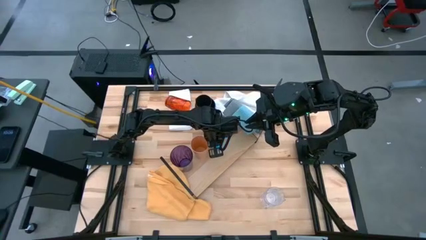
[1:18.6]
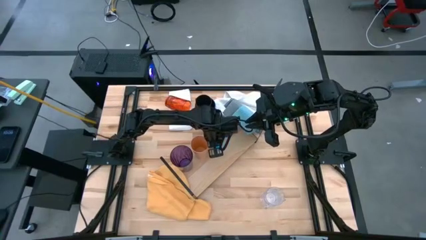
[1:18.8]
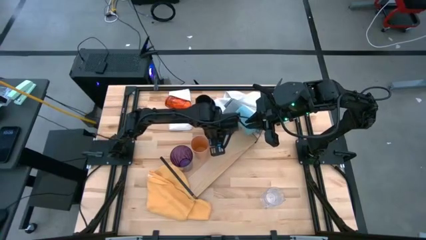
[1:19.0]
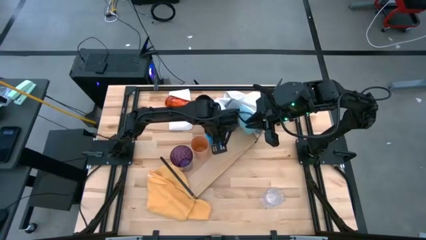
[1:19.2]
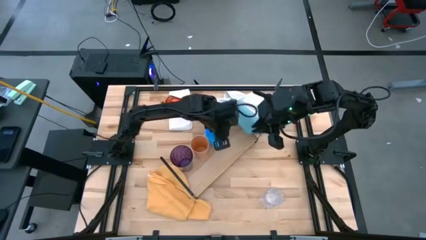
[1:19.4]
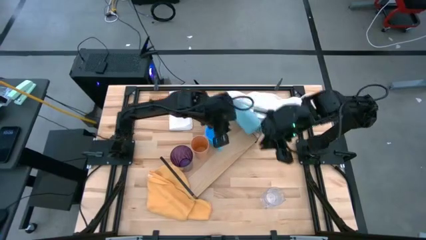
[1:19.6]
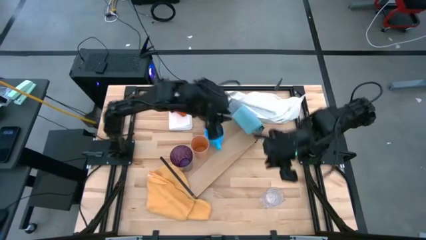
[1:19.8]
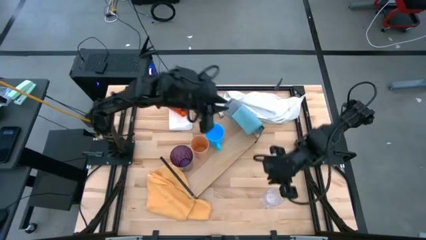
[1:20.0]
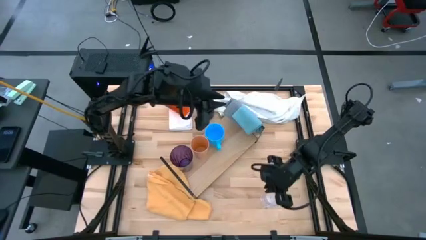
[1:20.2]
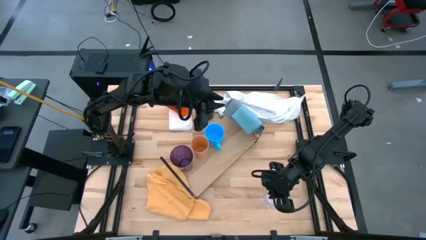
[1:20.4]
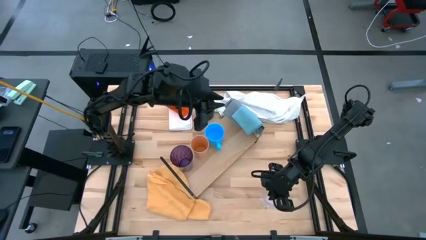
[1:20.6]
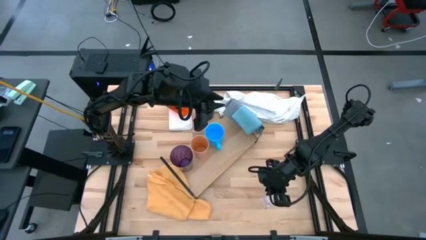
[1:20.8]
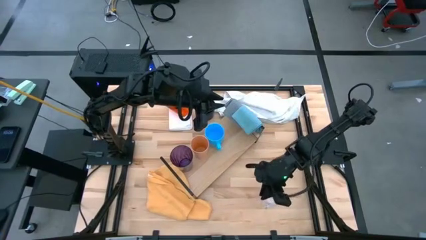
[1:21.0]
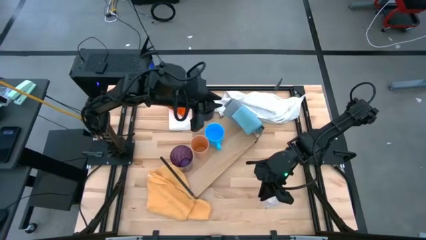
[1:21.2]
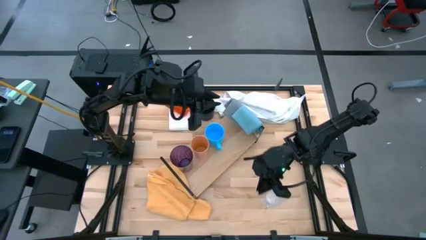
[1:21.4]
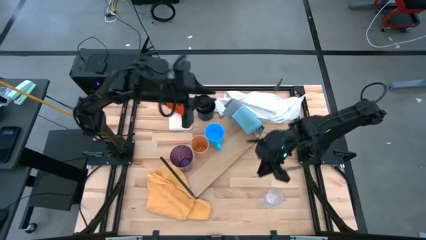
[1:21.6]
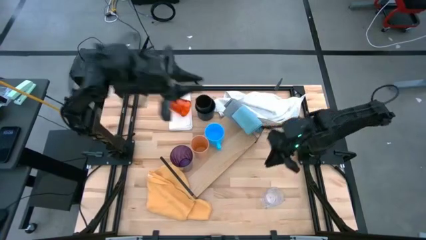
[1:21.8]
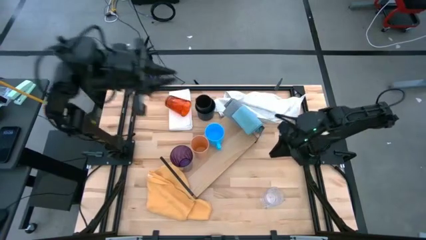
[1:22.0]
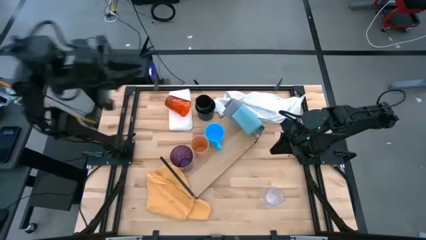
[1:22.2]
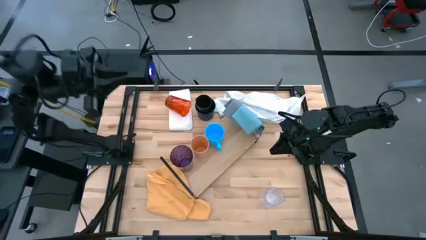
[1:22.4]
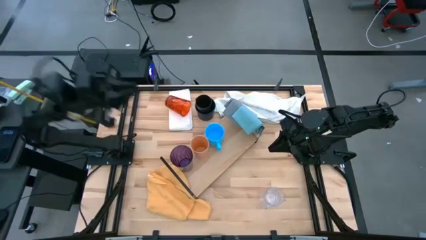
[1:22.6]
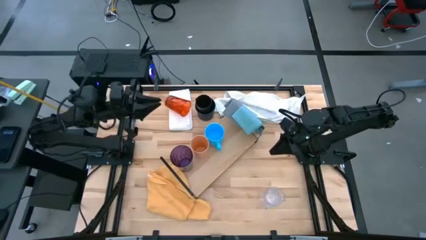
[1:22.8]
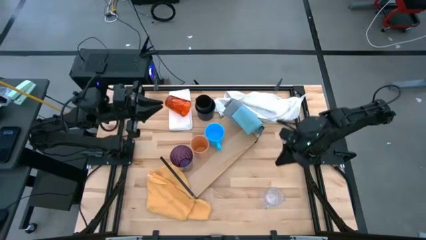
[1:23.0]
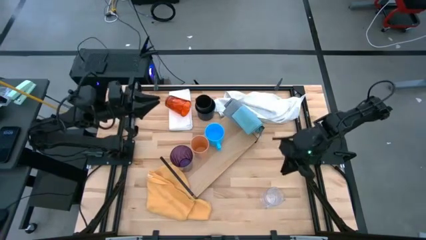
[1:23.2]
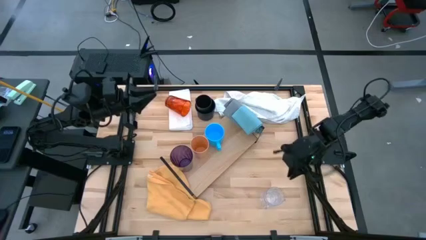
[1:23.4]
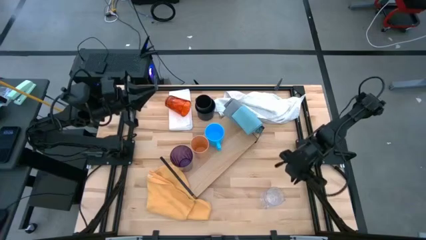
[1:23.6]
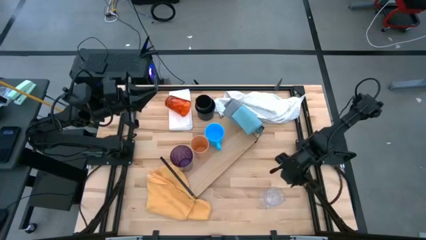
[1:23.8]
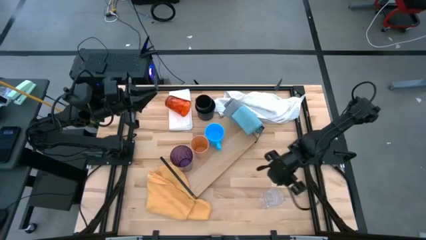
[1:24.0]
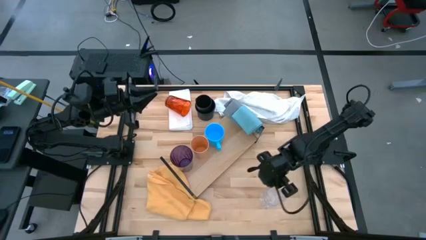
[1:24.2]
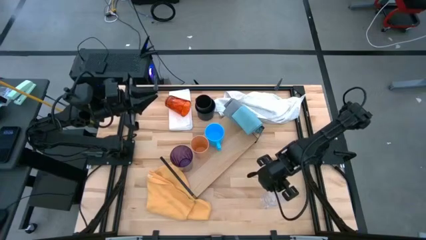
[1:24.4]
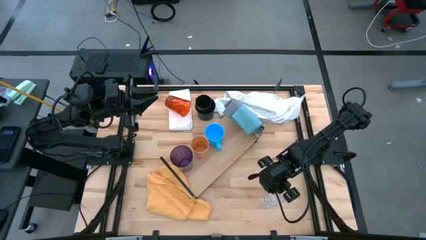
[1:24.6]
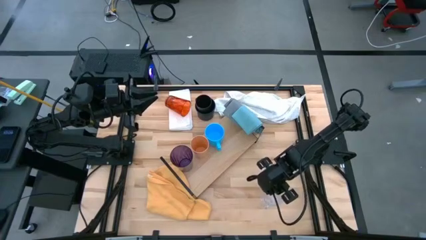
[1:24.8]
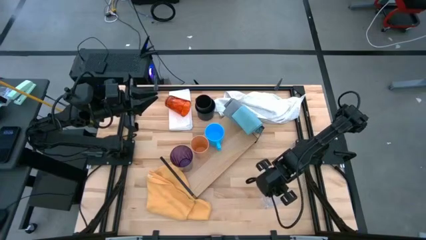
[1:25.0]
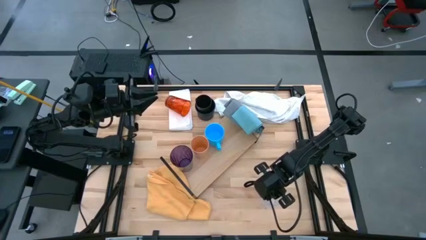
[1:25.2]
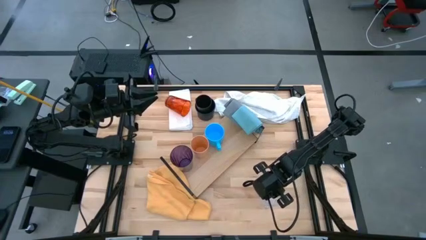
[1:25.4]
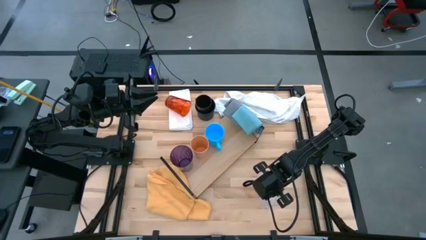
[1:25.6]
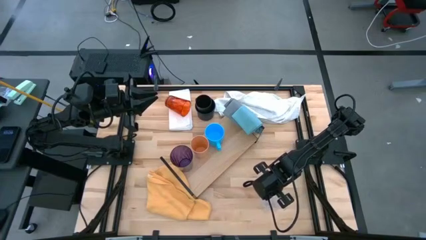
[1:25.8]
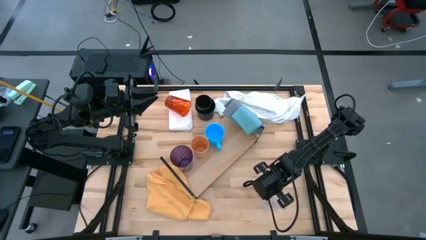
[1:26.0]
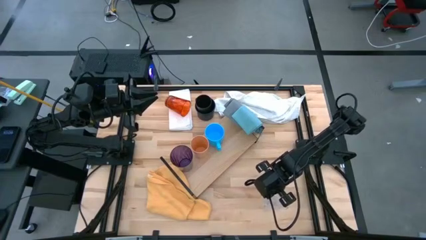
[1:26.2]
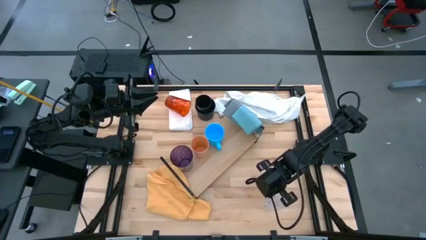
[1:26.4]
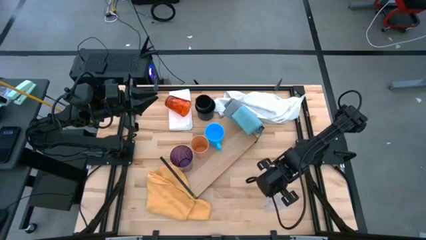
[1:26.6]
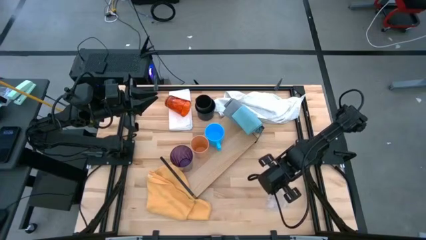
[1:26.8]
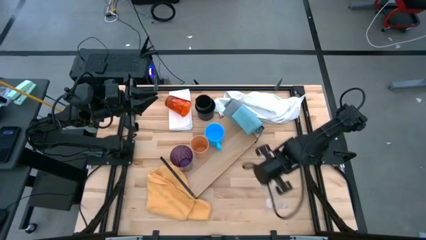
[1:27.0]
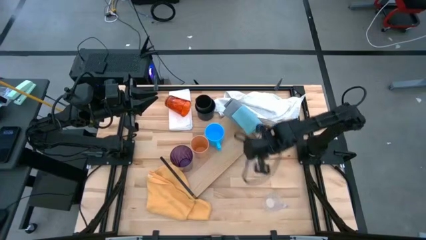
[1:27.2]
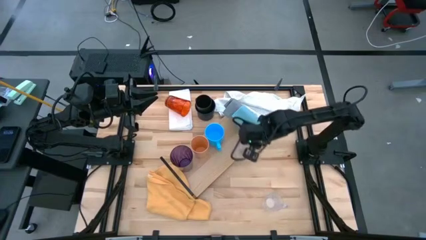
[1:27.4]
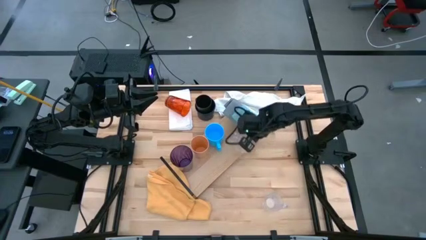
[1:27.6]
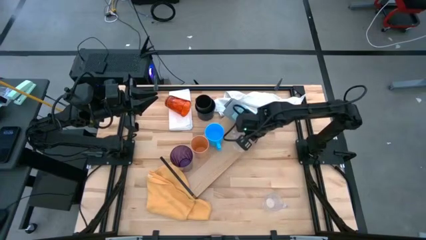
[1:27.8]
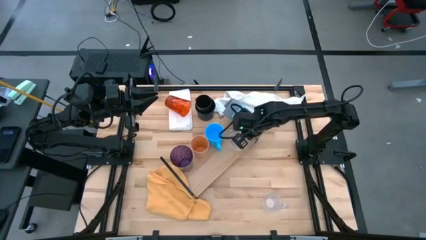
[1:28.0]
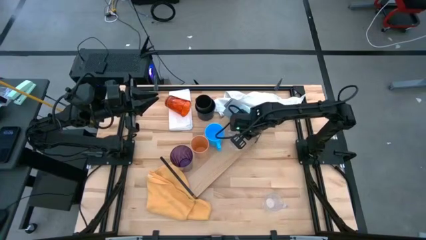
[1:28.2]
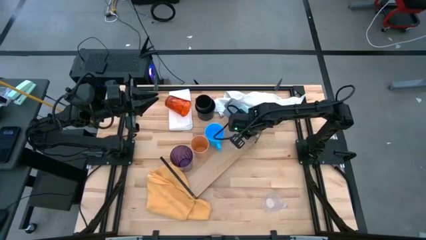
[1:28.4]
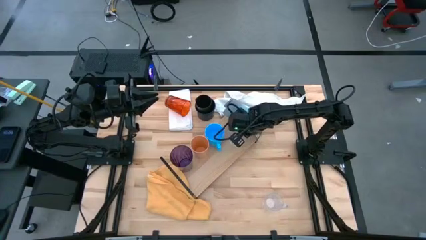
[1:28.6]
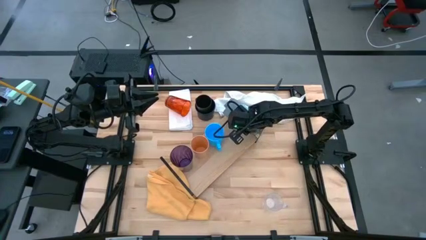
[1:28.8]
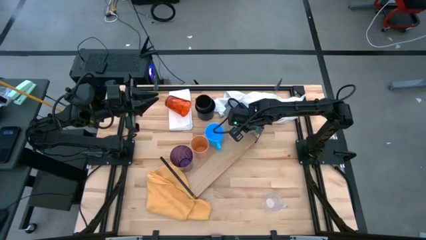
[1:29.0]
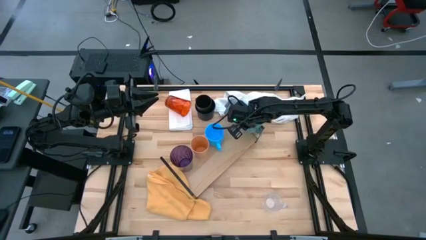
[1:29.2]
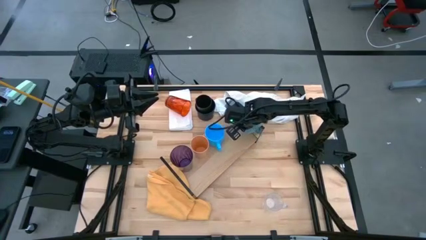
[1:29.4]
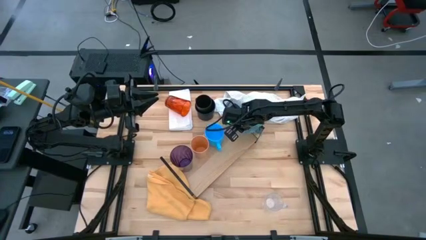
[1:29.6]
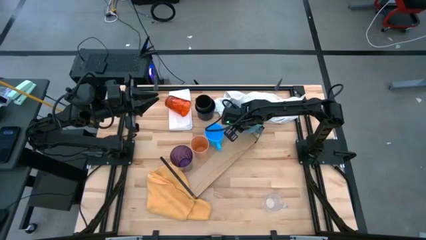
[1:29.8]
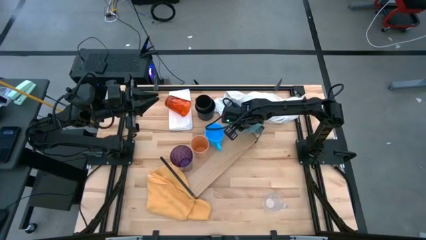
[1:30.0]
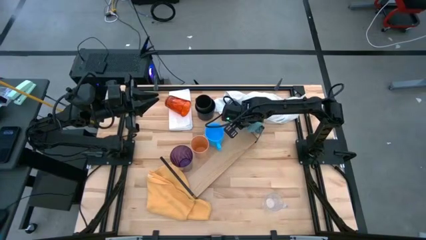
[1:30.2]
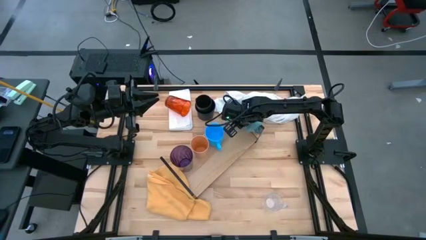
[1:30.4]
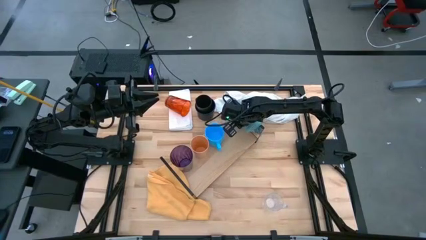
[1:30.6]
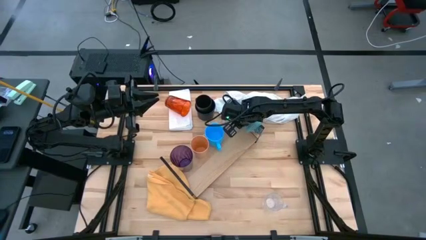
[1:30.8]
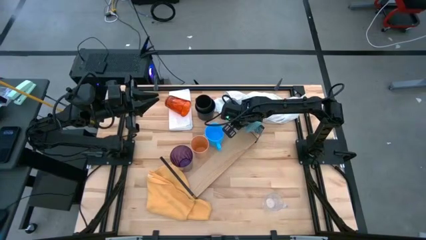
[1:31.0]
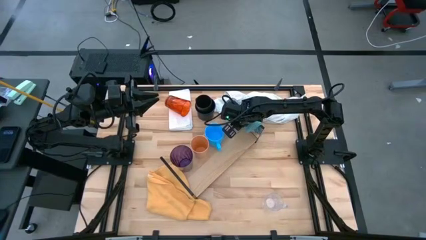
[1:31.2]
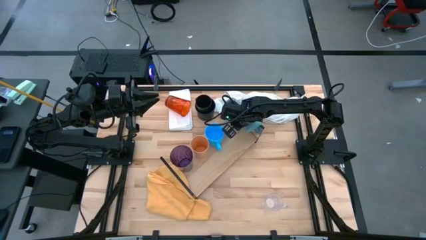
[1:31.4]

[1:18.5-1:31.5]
Task: Stack small to large cups/mugs on shelf
Put the transparent mug on the shelf
